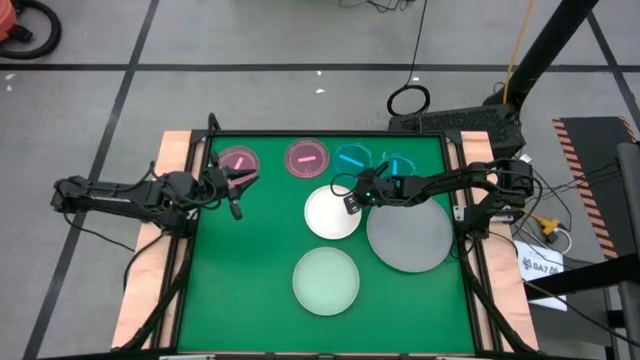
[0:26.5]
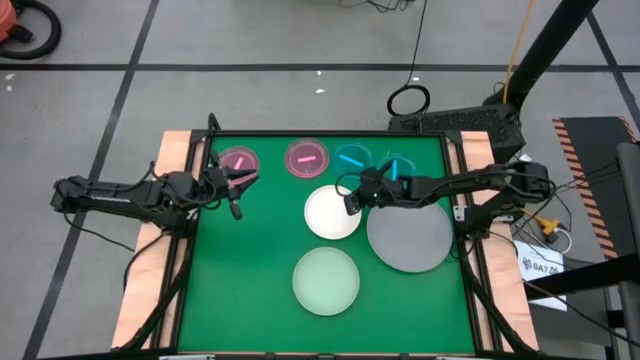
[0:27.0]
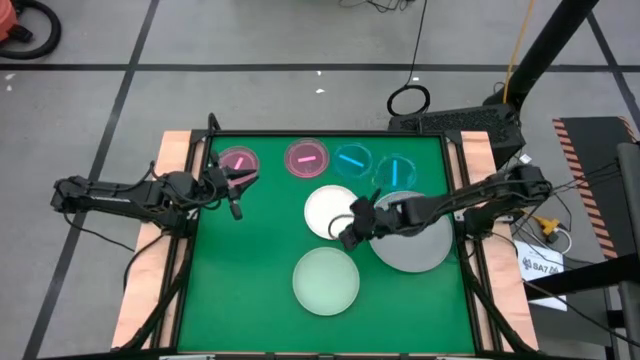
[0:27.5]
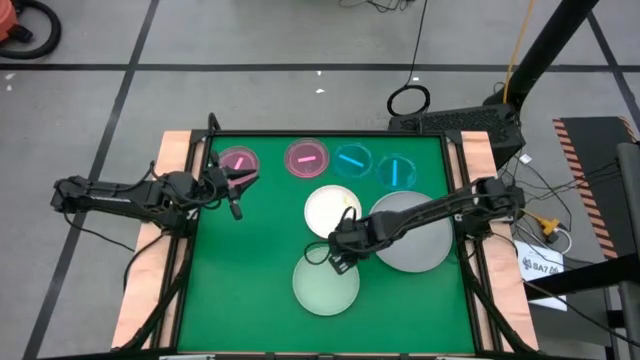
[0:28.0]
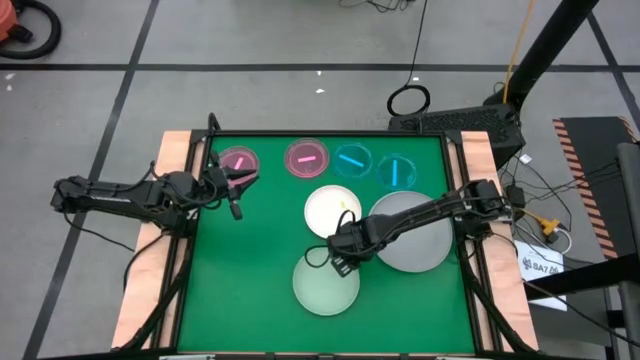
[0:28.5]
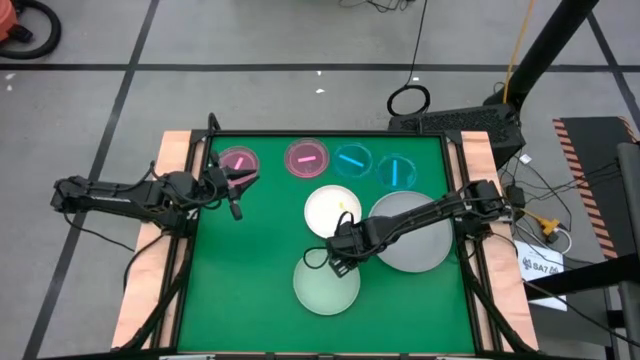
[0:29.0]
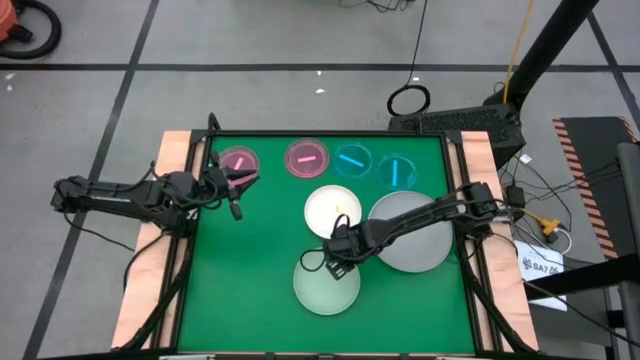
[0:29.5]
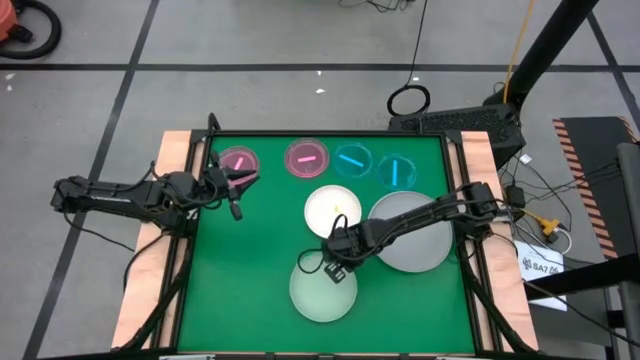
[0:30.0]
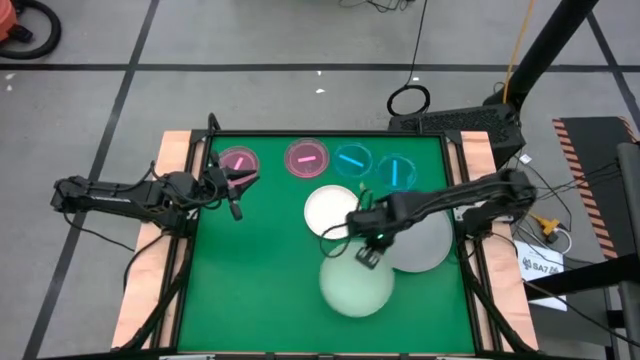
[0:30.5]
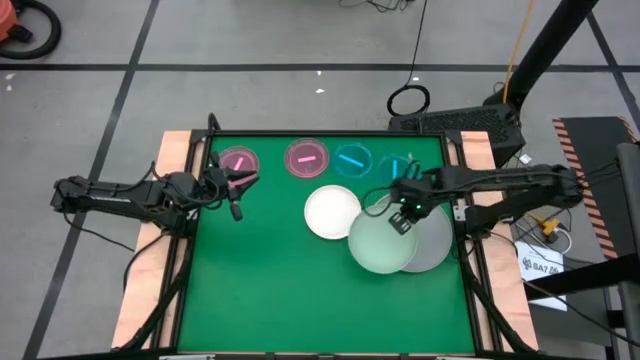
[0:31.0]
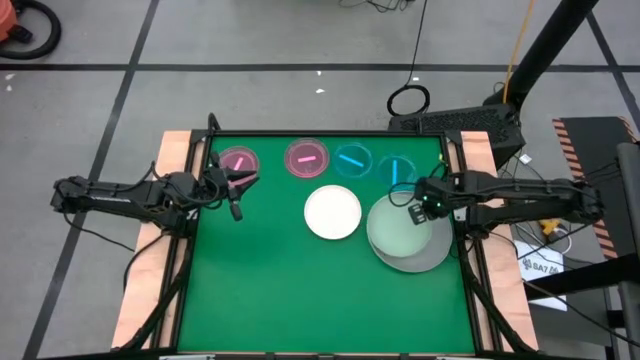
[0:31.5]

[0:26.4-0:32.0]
Task: Stack plastic plates
Stack the green plate on top of the gray plate

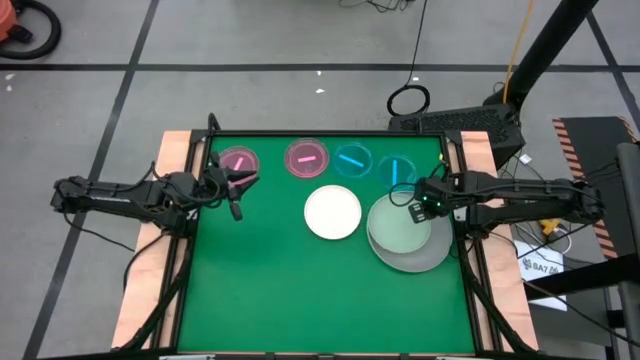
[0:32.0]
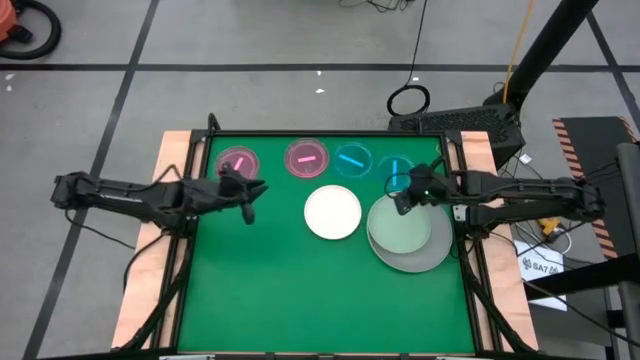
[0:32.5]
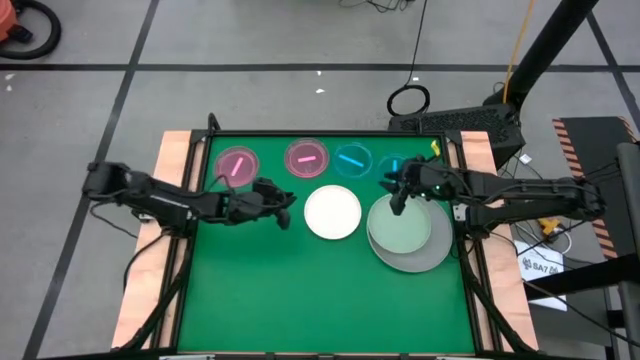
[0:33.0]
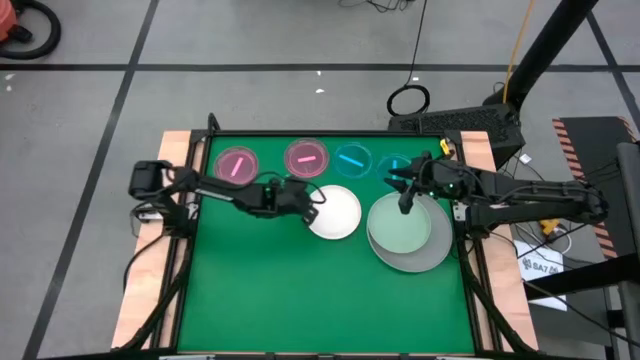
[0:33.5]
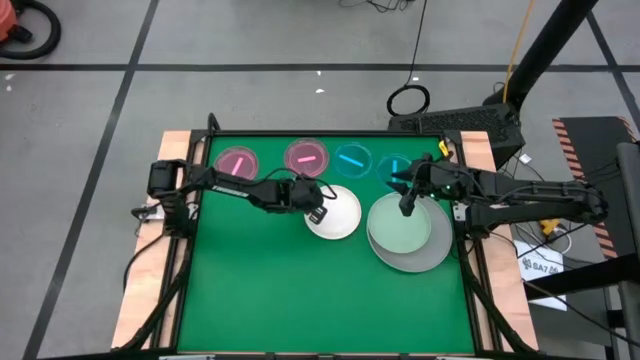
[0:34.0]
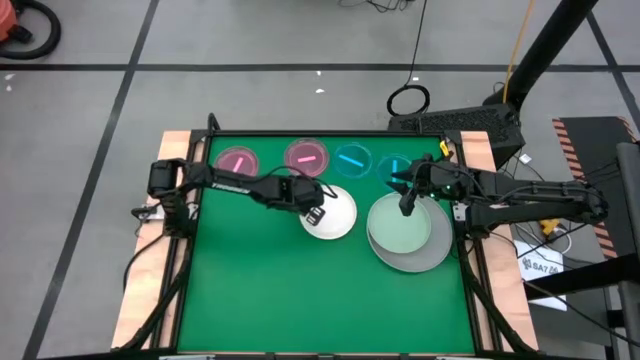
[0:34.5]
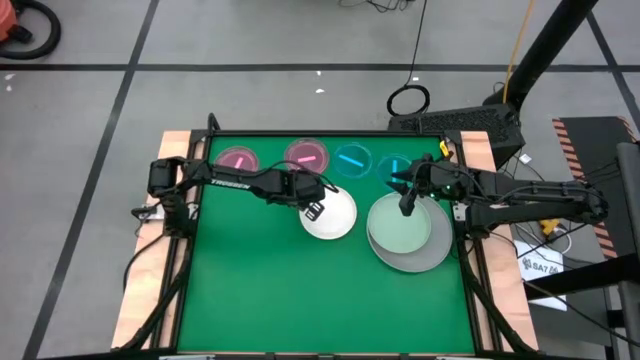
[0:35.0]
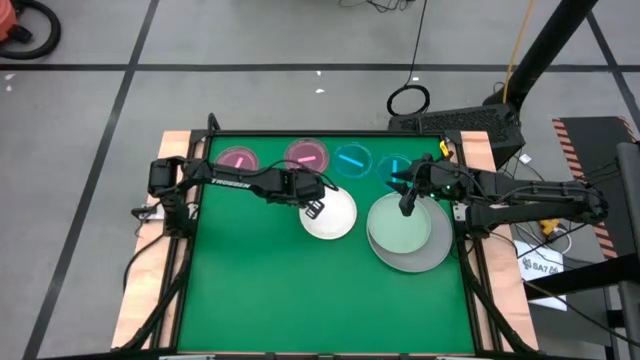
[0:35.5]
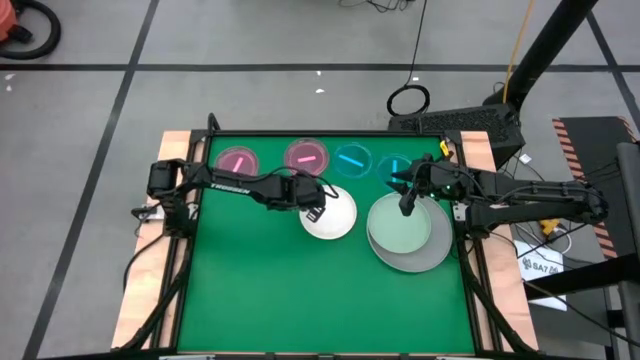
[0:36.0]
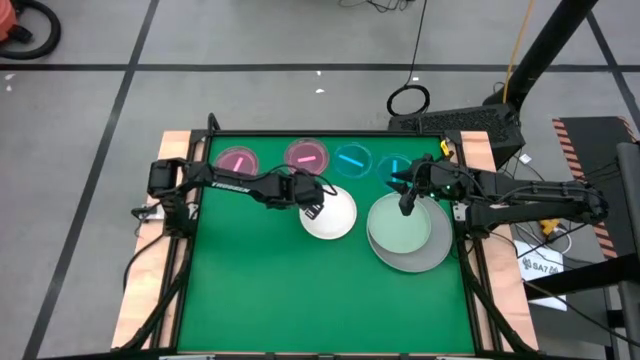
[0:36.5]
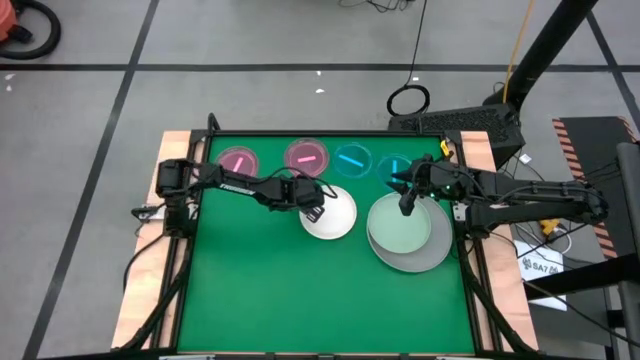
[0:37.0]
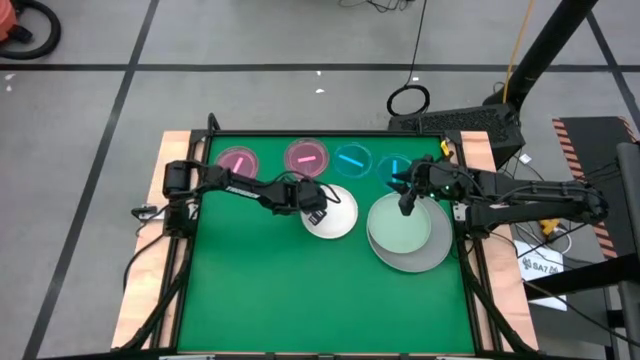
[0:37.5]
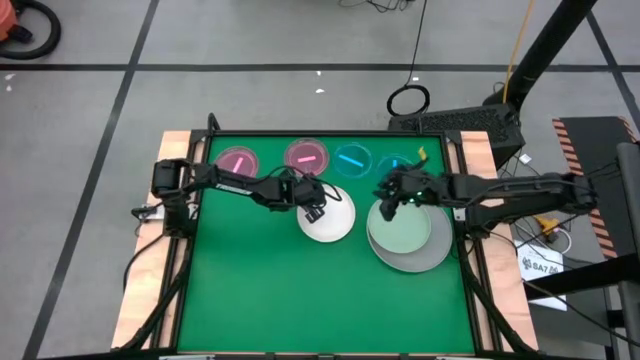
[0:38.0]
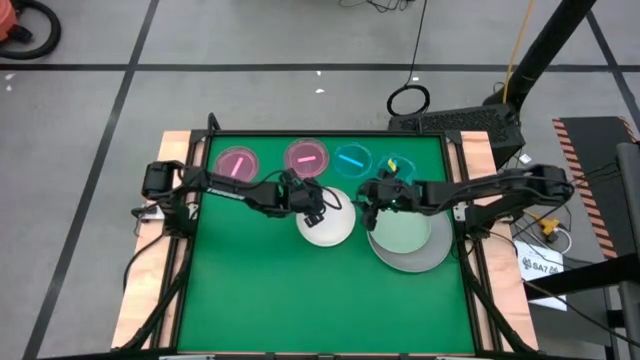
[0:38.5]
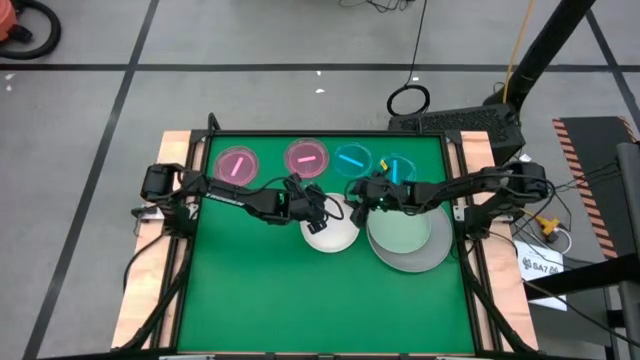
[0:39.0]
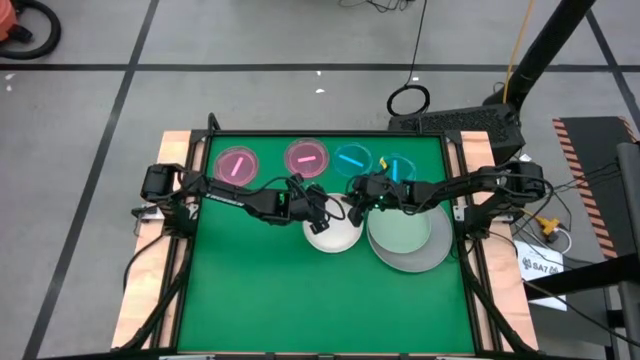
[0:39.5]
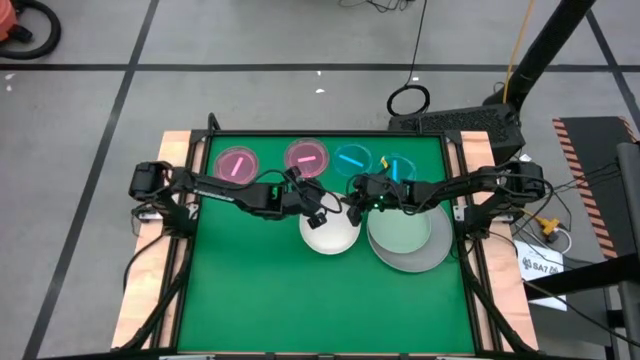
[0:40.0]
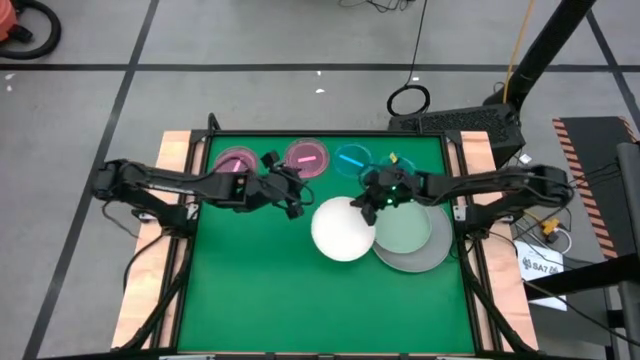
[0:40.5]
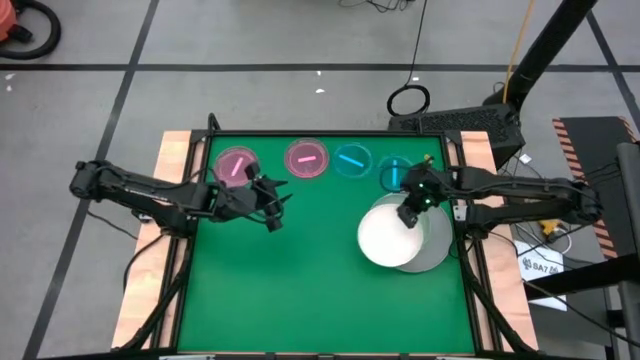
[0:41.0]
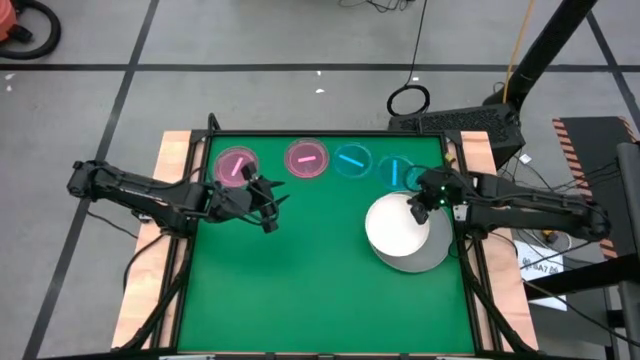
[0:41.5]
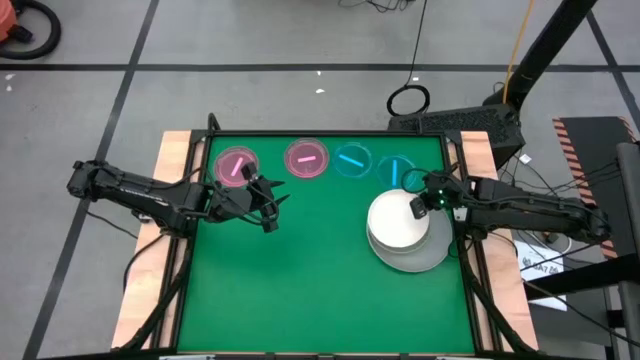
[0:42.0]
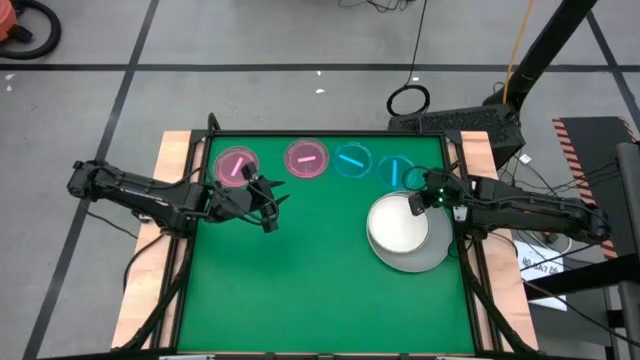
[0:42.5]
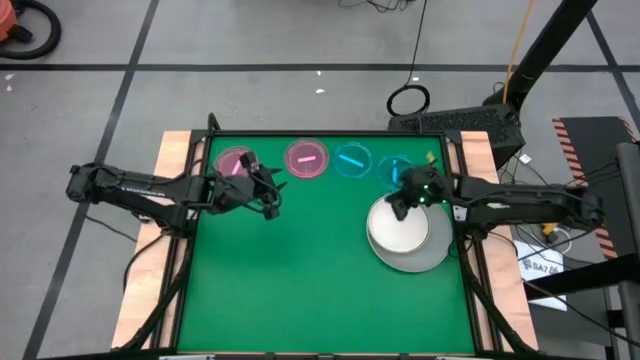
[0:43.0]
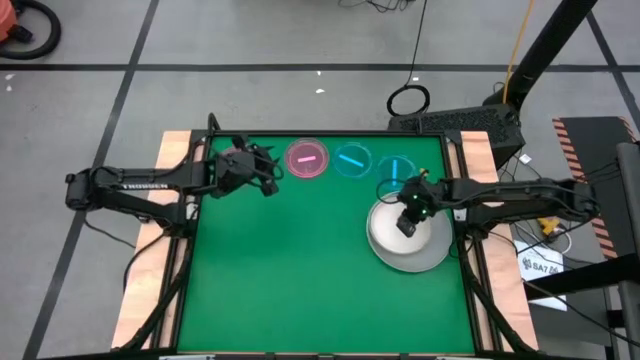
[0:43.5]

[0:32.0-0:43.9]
Stack the white plate on top of the green plate

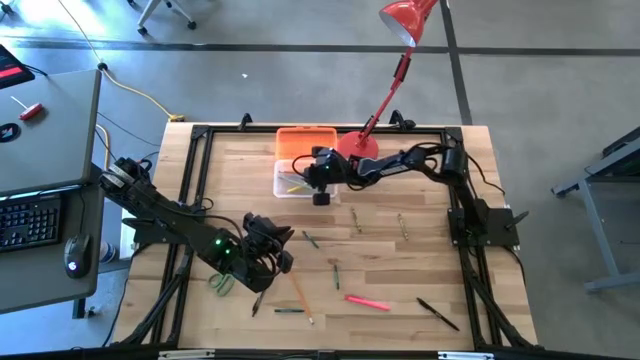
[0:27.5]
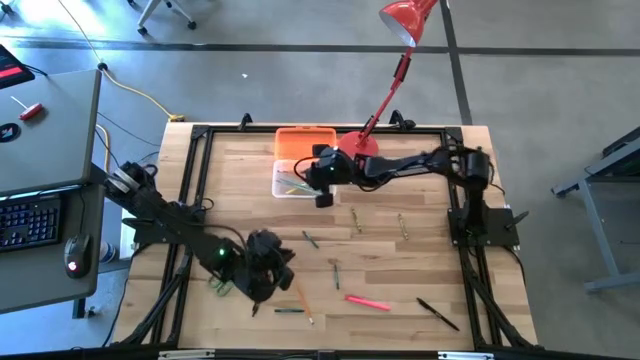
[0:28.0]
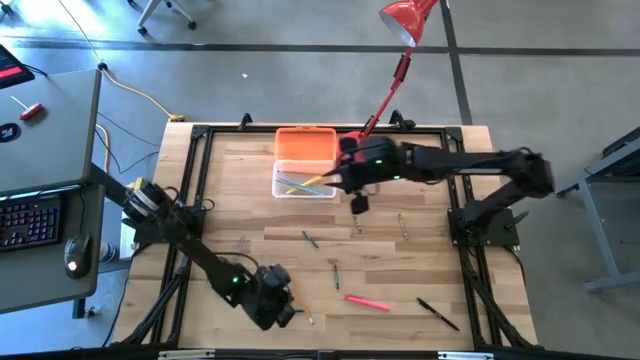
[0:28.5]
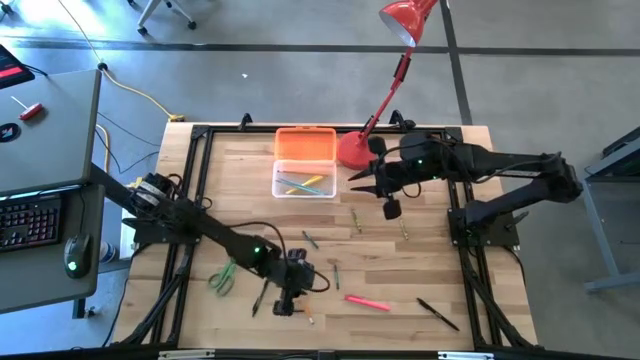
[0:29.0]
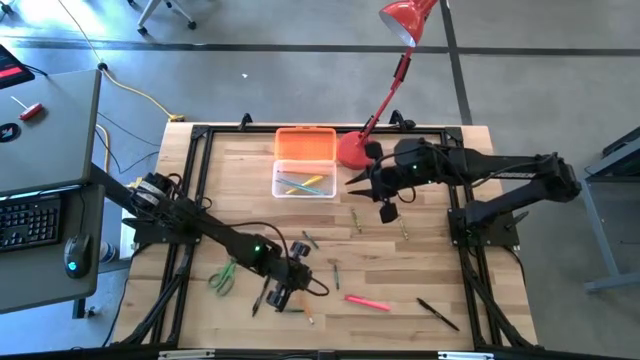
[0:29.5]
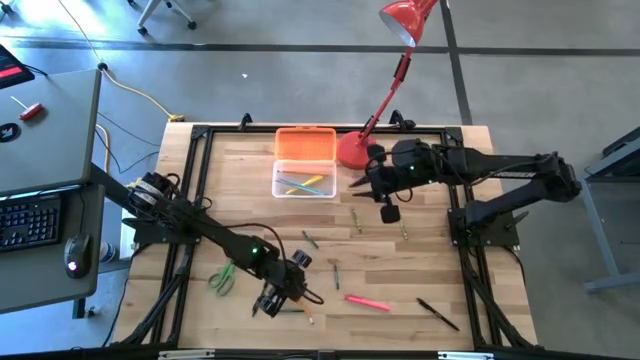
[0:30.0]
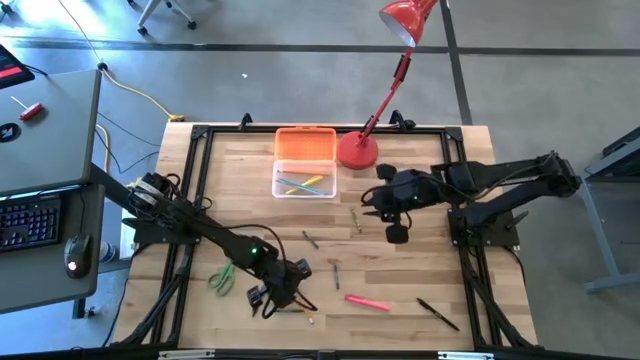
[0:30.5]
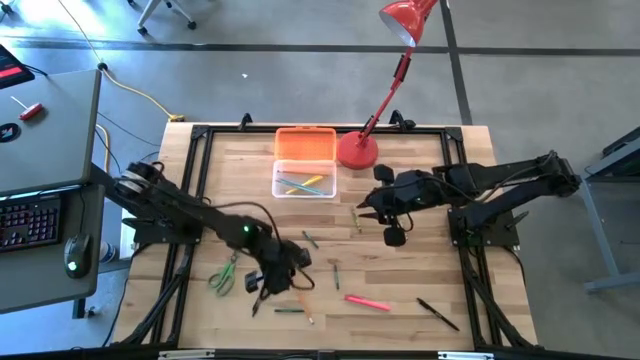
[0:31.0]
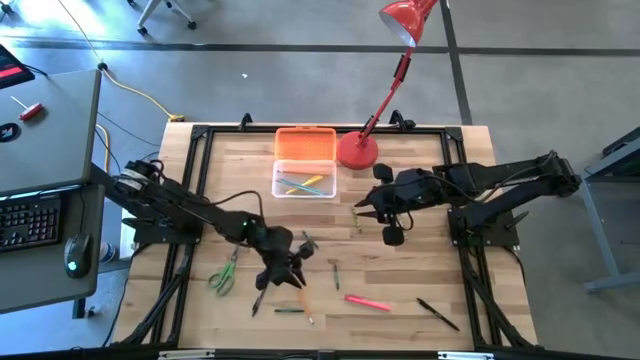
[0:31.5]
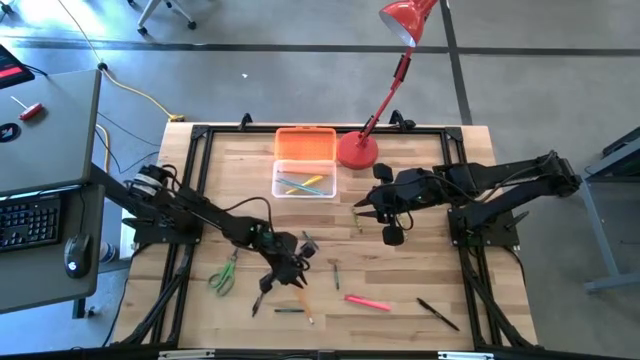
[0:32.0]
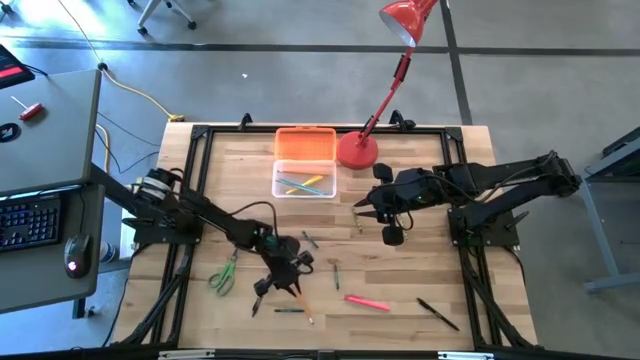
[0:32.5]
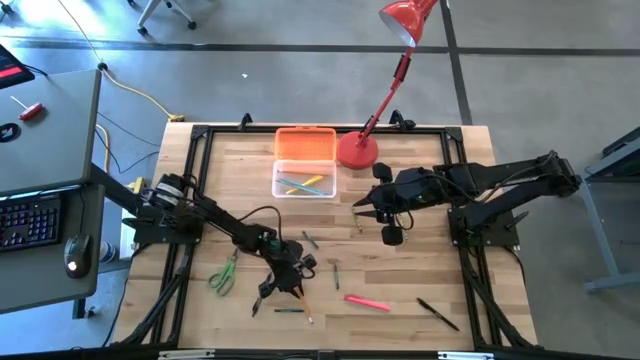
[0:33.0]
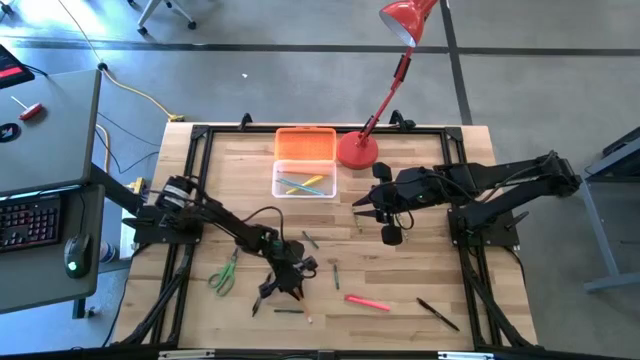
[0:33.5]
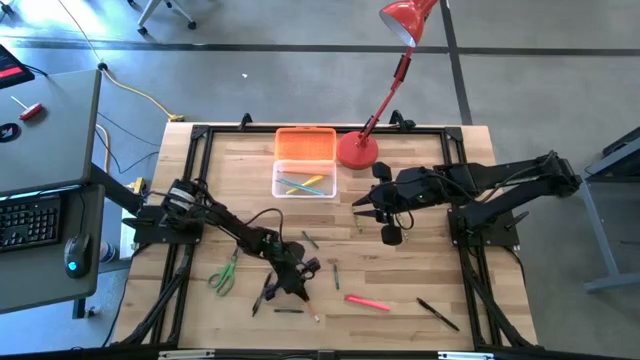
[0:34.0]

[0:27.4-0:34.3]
Task: Pick & place school supplies into a supply box
Put the orange pencil into the orange supply box
